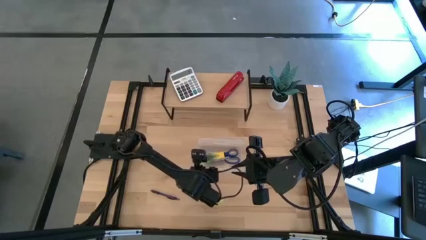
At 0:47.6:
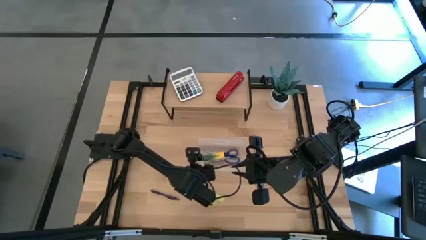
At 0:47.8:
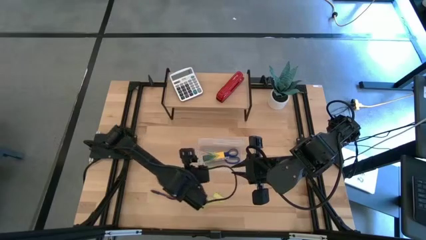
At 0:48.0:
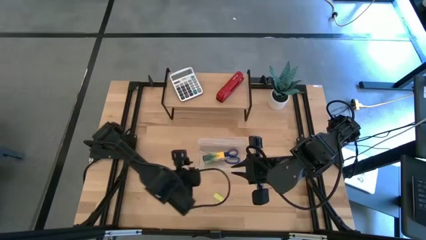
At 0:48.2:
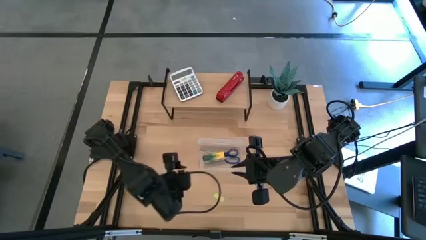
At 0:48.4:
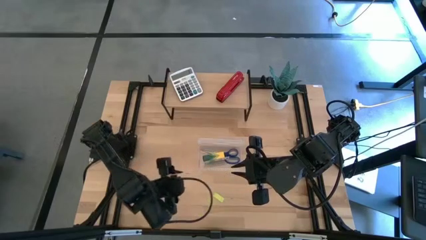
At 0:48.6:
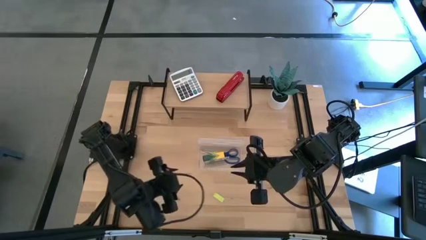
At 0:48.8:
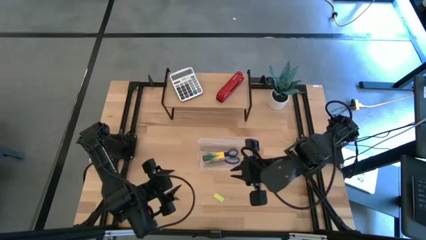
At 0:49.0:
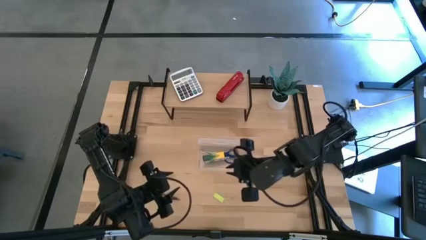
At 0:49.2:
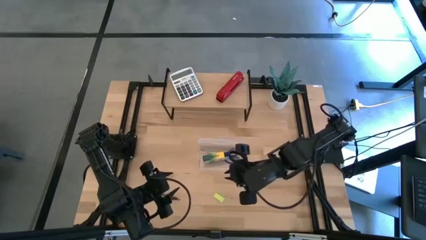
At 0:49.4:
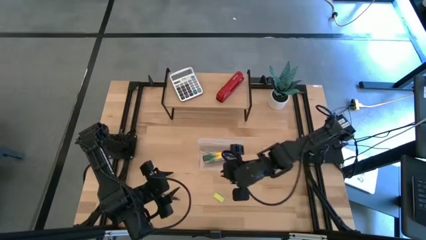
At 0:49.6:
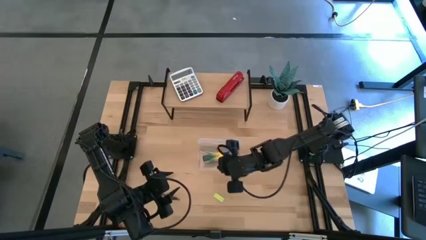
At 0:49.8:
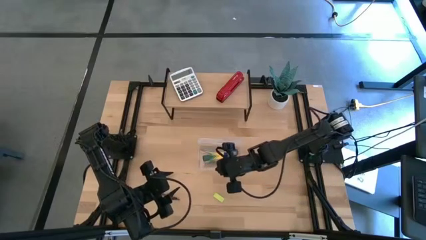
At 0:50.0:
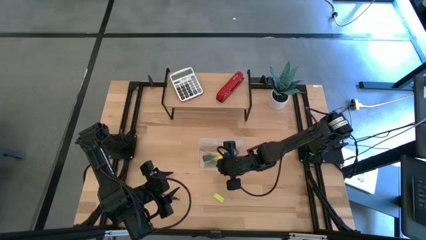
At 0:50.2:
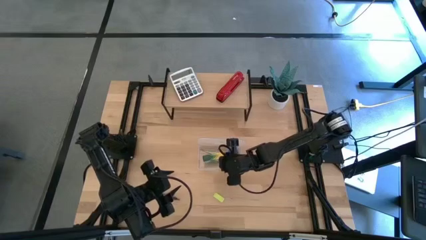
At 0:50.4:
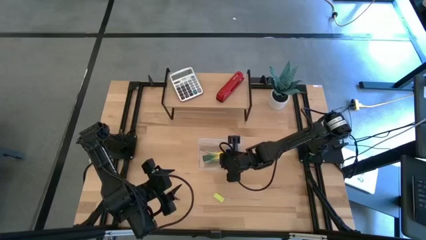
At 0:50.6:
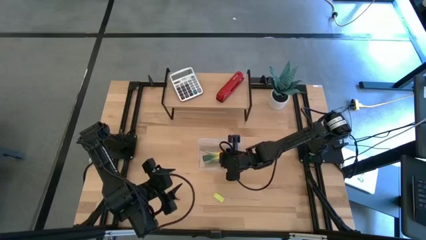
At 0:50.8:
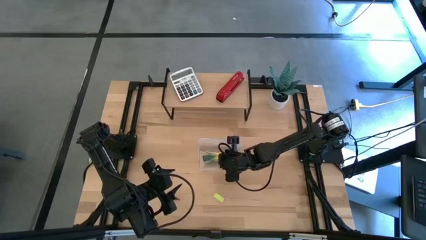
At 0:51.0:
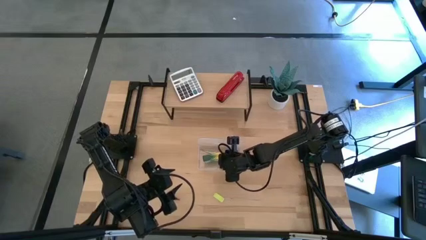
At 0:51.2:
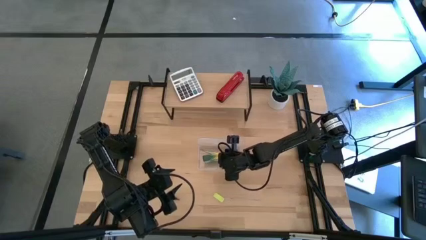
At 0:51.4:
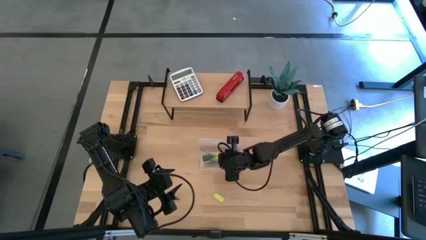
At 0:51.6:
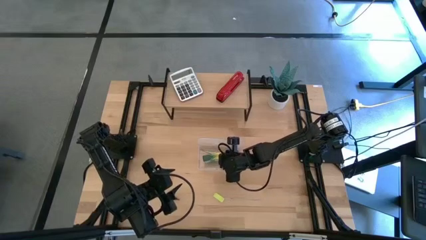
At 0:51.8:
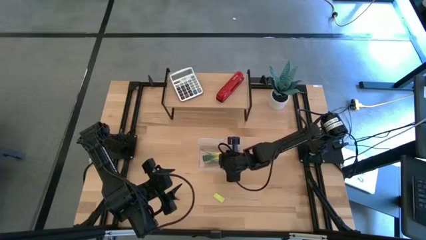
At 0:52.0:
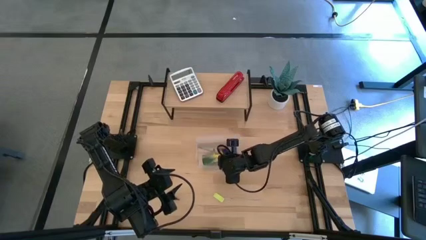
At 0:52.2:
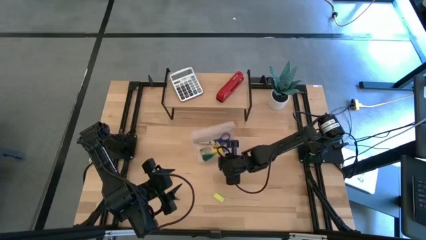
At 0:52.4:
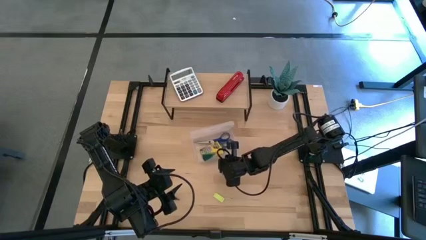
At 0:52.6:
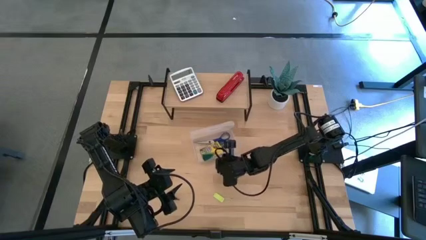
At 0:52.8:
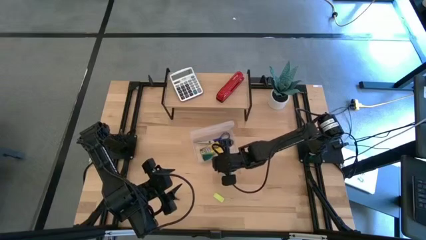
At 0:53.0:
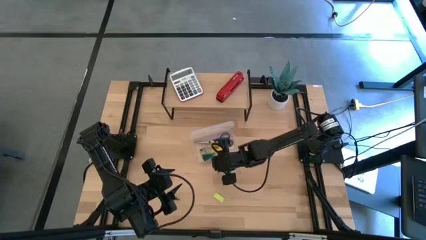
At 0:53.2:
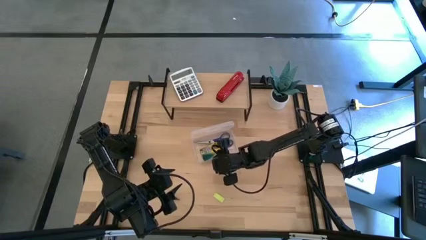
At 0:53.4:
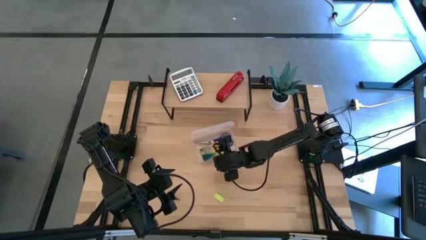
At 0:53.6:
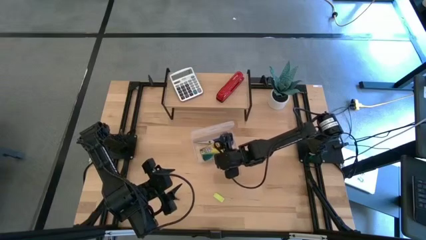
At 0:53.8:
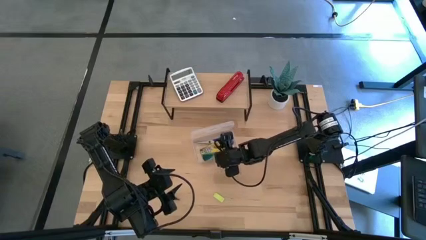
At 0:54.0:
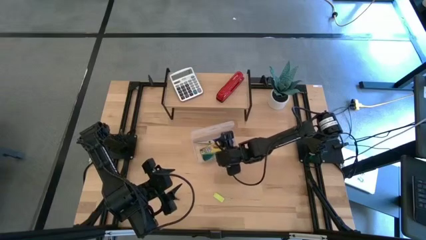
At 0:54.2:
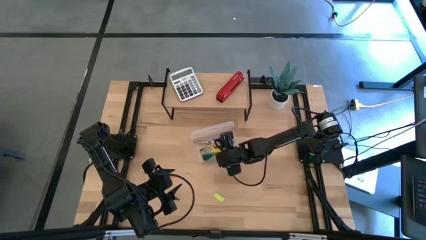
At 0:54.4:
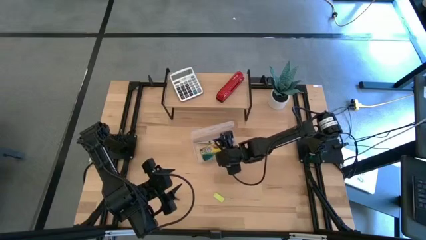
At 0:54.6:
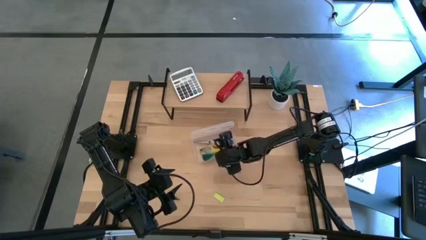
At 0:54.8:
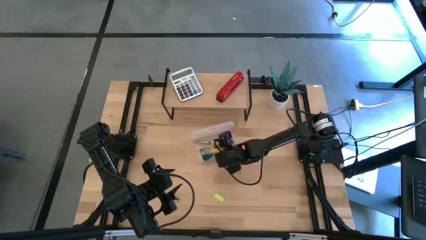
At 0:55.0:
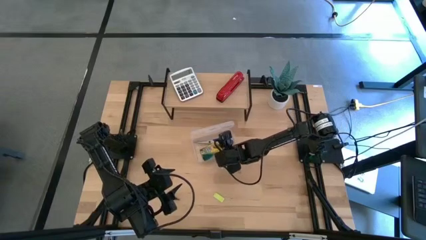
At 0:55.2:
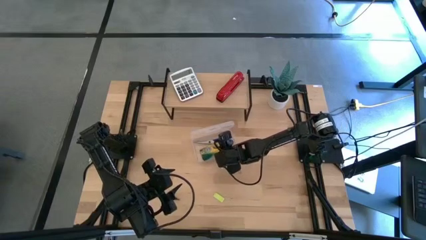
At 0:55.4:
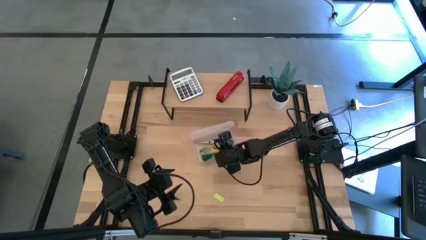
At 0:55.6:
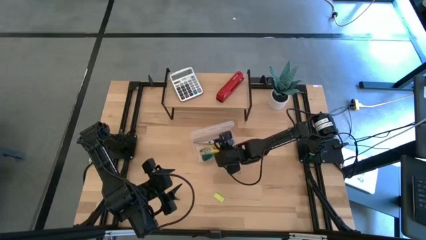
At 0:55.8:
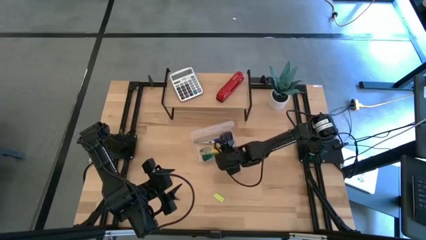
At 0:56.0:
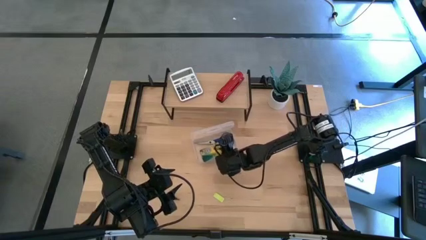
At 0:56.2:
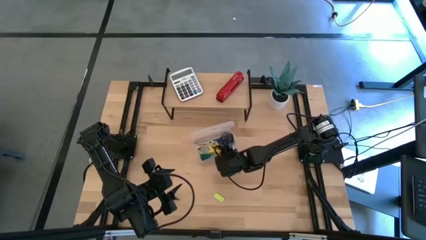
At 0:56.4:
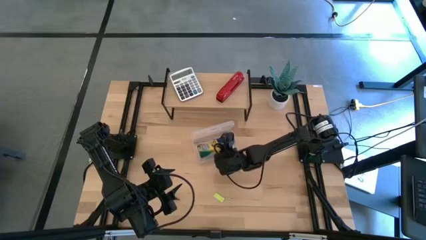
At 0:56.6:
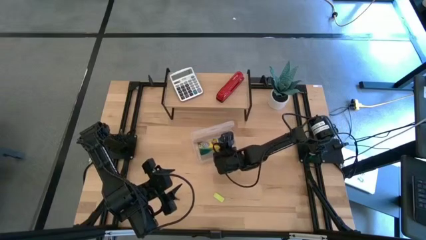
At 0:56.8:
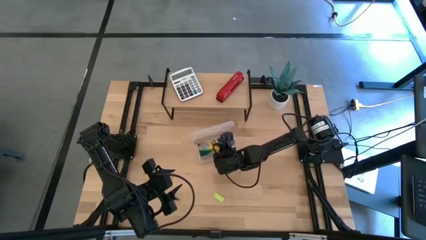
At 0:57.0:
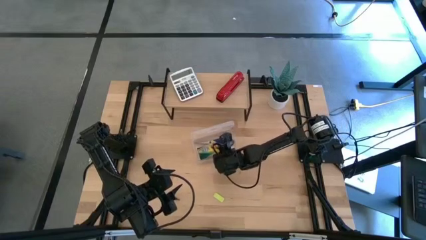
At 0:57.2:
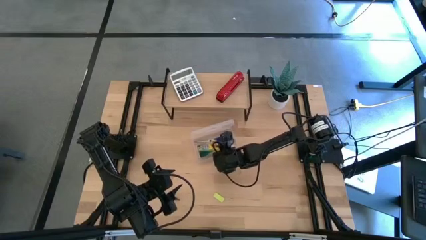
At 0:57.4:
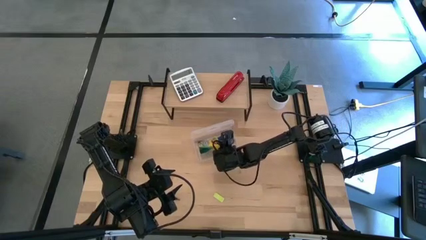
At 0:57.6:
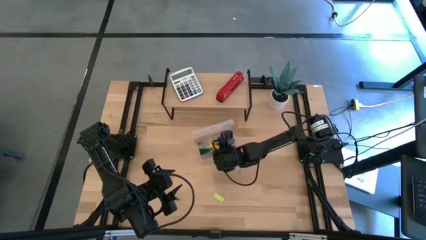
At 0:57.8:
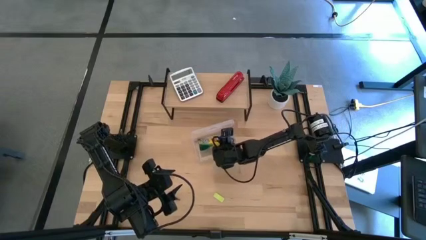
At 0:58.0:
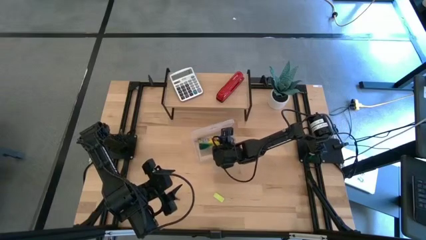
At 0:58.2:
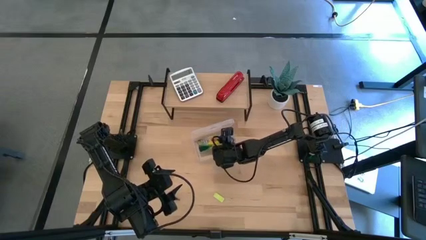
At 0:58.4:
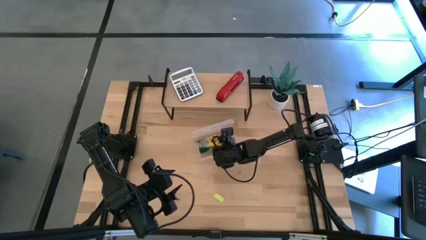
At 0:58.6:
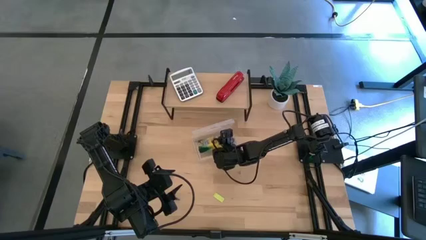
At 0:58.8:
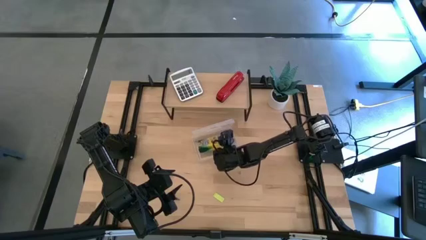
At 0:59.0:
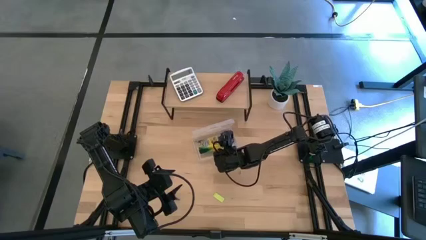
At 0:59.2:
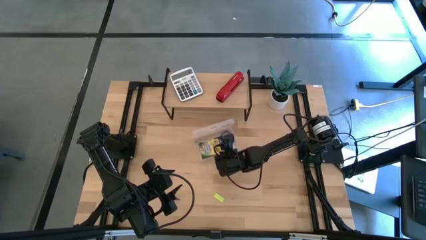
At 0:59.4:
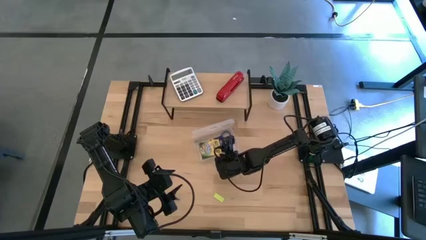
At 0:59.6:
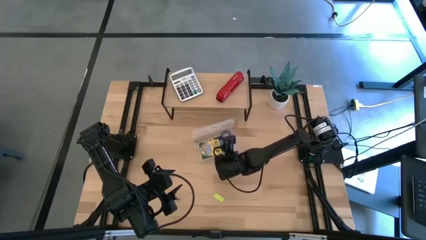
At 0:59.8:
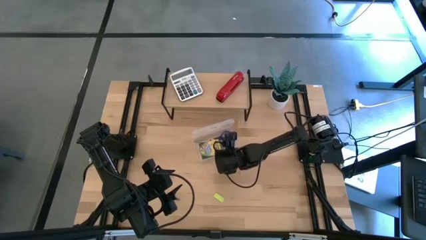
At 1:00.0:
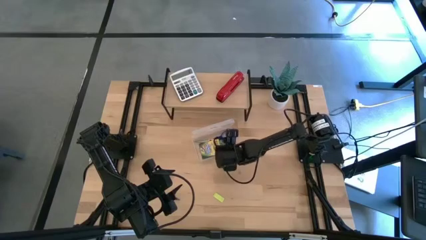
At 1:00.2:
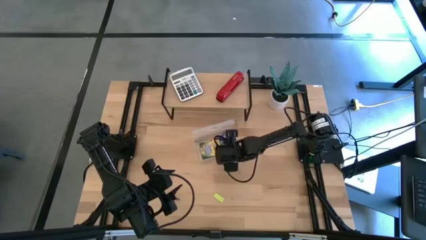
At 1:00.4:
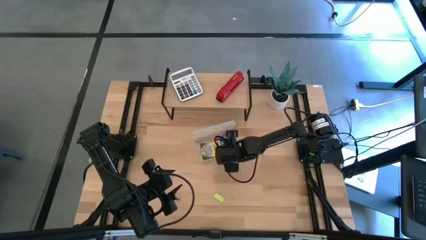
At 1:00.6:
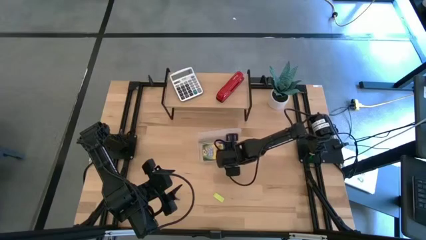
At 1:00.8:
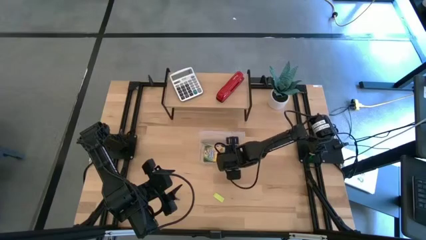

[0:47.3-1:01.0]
Task: Pack school essentials
Put the yellow crayon box into the transparent supply box

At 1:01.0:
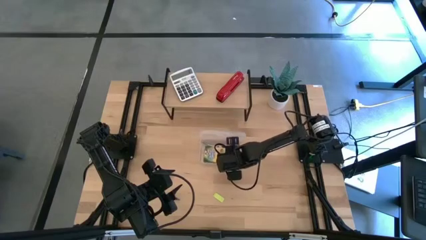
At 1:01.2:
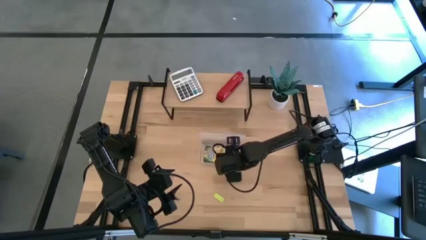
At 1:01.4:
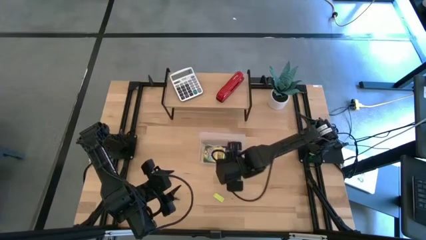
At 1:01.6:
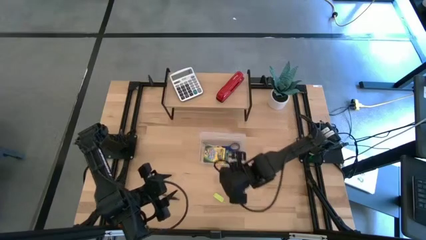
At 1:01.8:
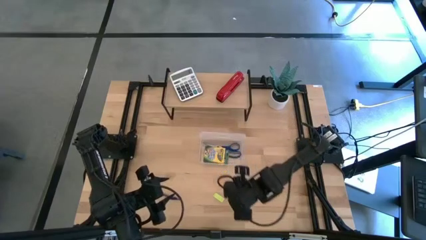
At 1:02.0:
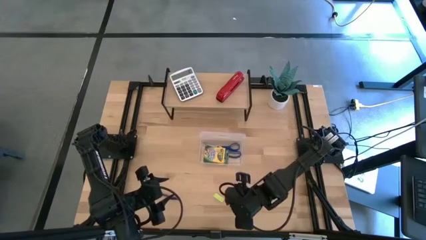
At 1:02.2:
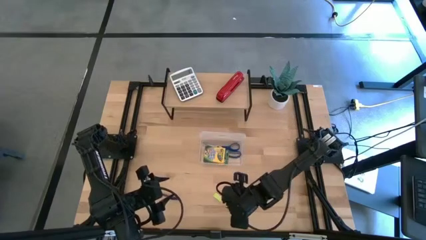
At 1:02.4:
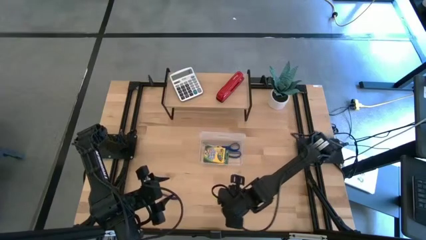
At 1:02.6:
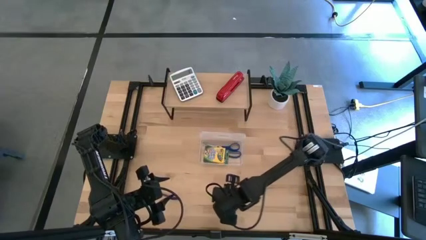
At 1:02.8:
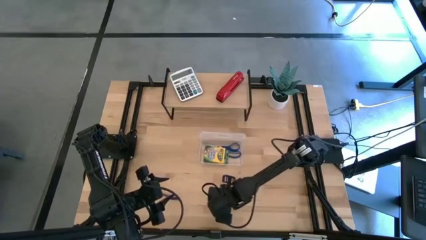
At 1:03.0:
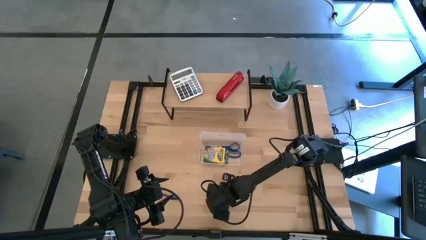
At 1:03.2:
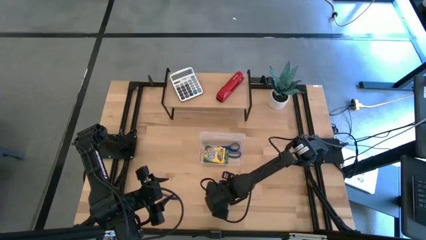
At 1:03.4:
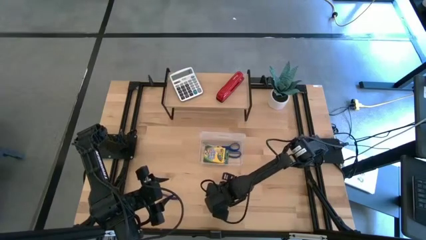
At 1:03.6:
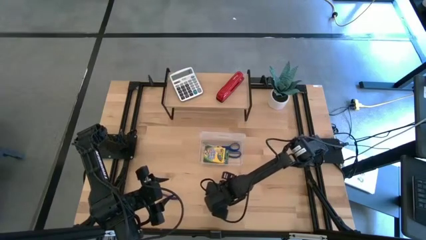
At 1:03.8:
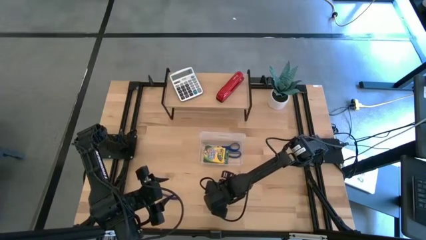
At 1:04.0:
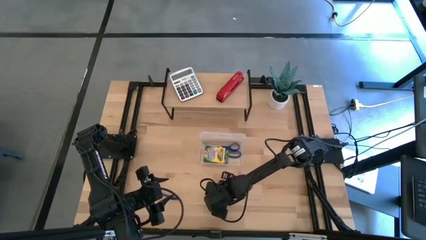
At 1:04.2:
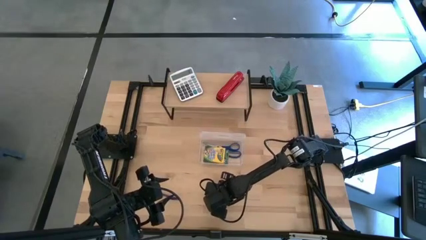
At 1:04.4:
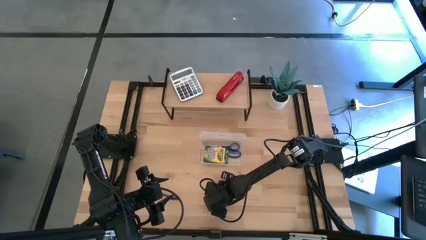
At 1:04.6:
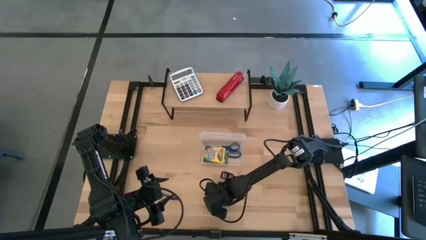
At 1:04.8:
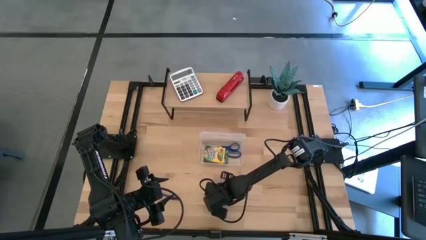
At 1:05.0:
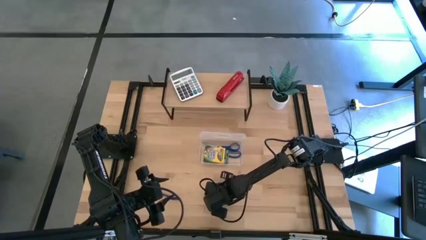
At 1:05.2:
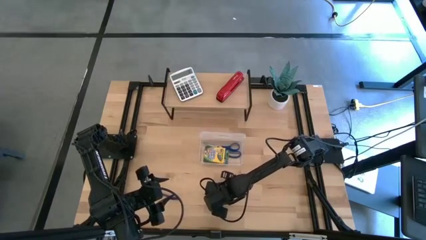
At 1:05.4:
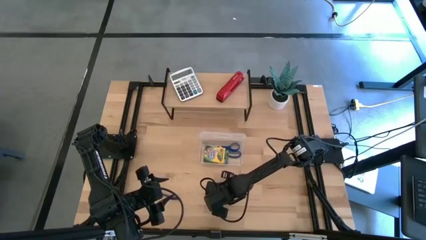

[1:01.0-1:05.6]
Put the green eraser into the transparent supply box
